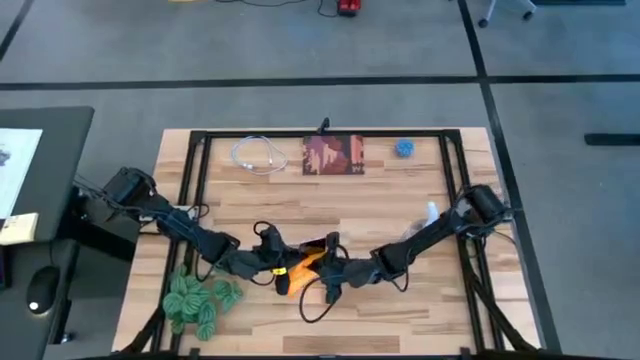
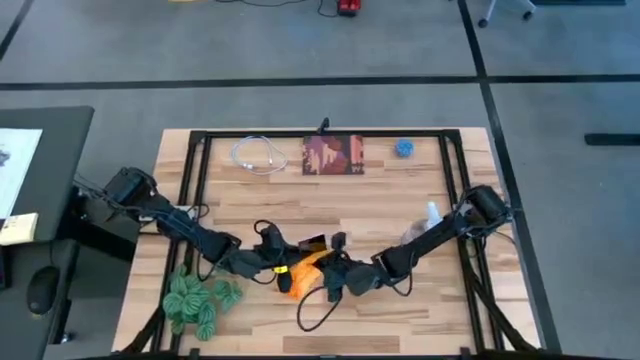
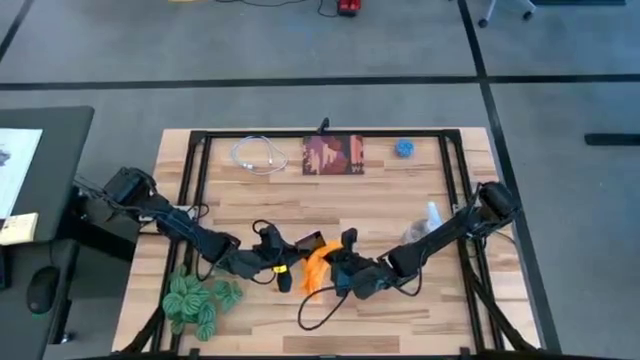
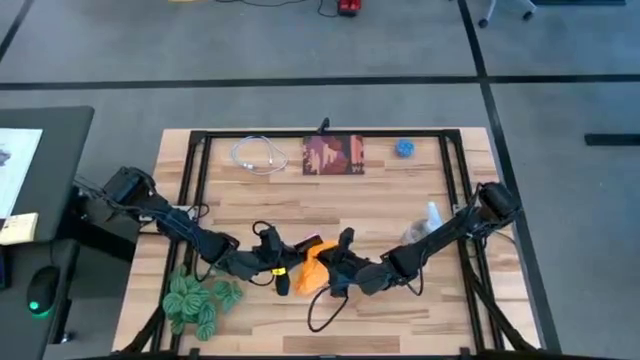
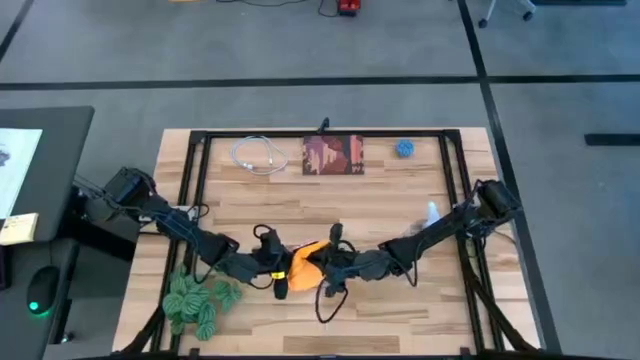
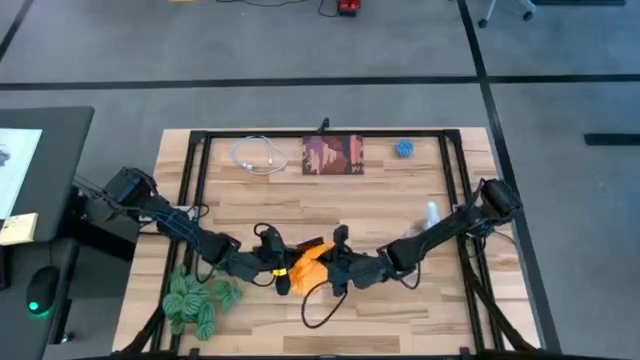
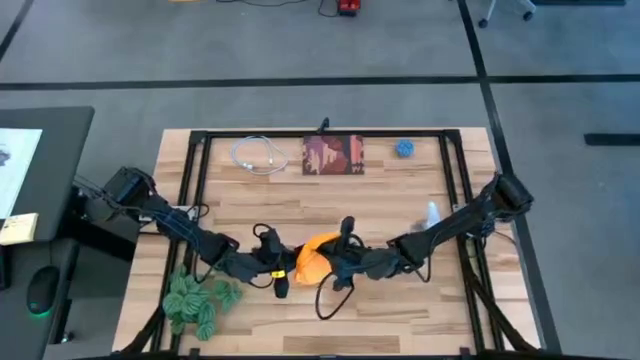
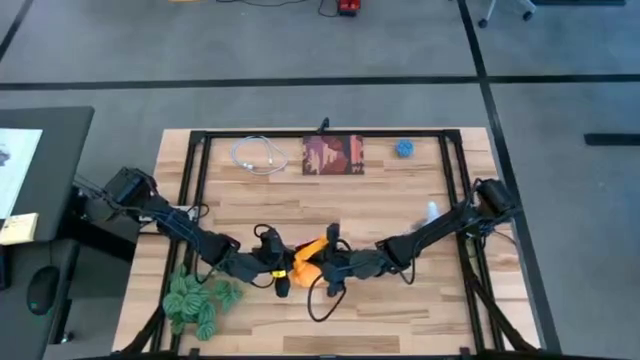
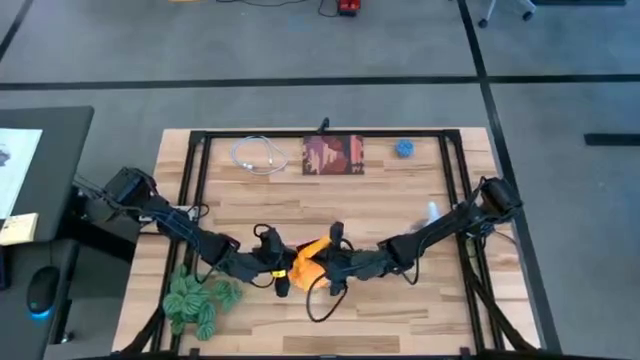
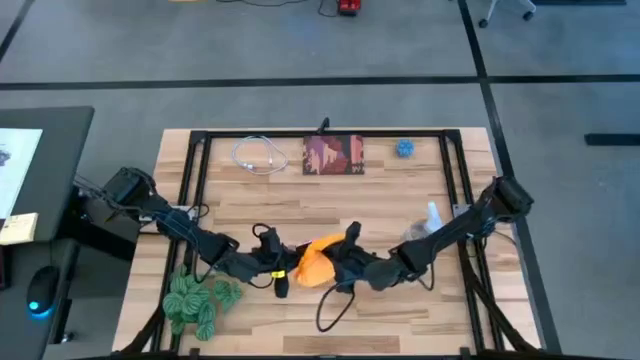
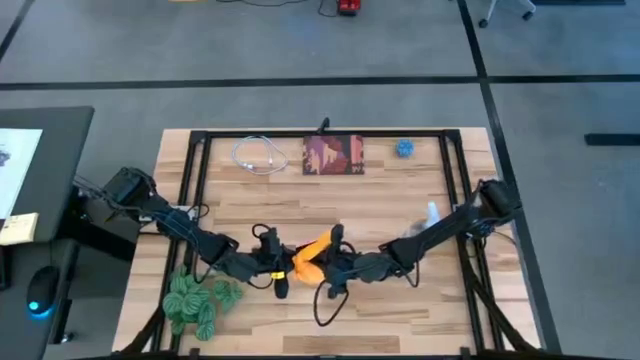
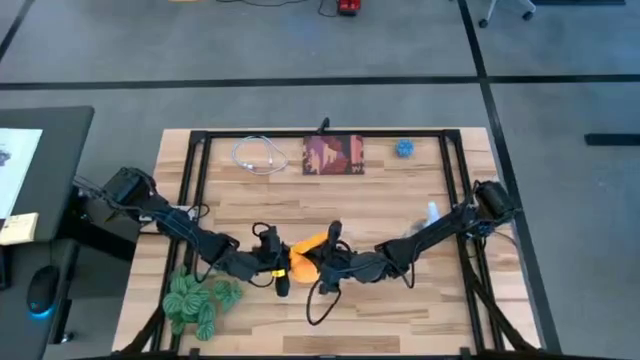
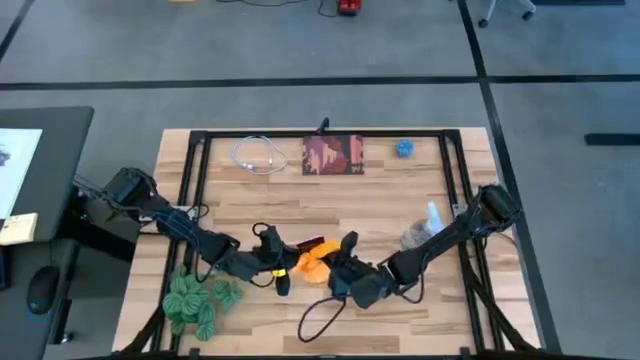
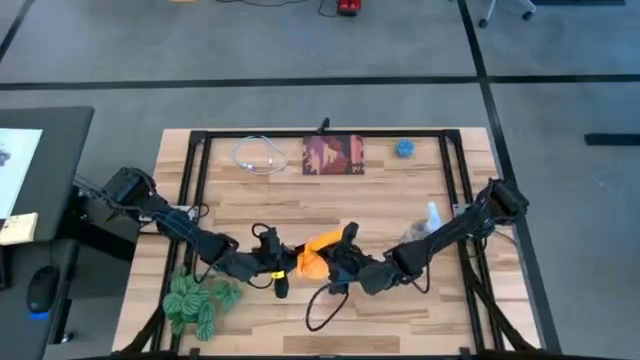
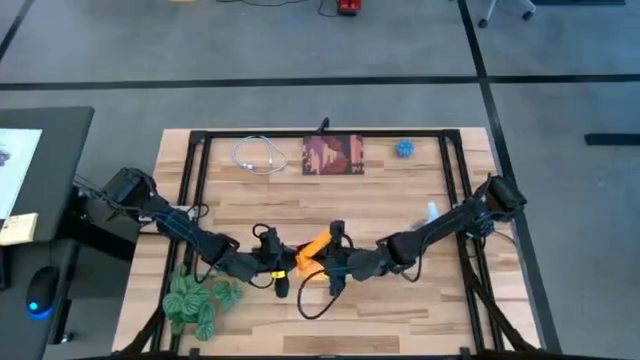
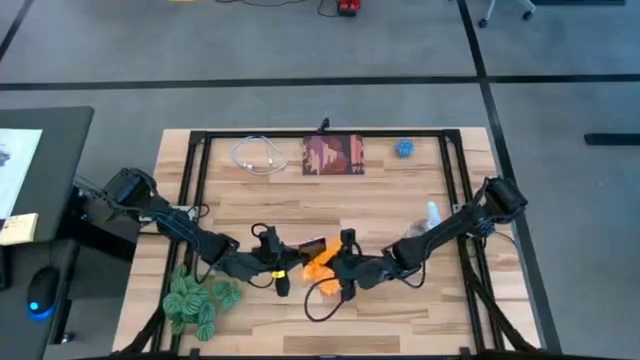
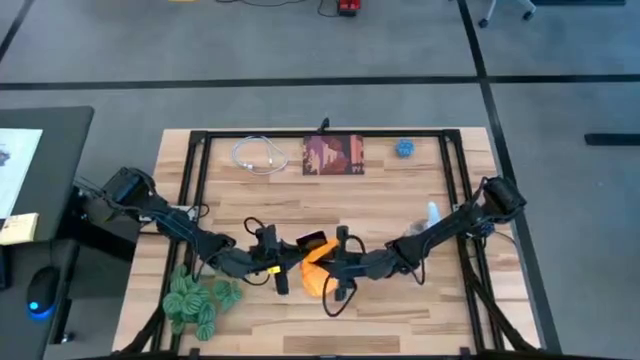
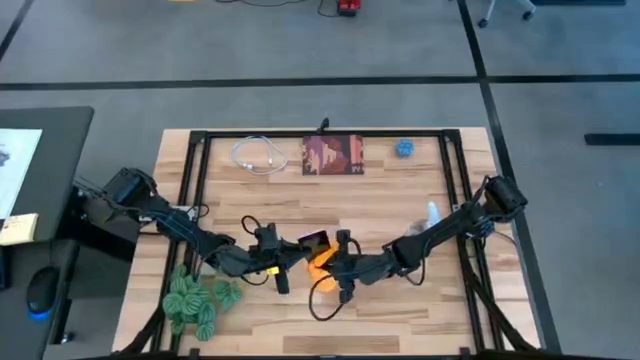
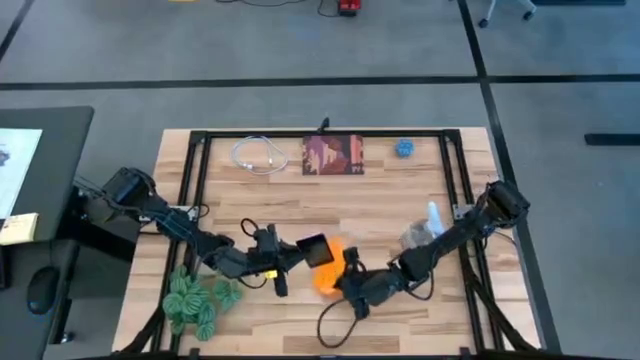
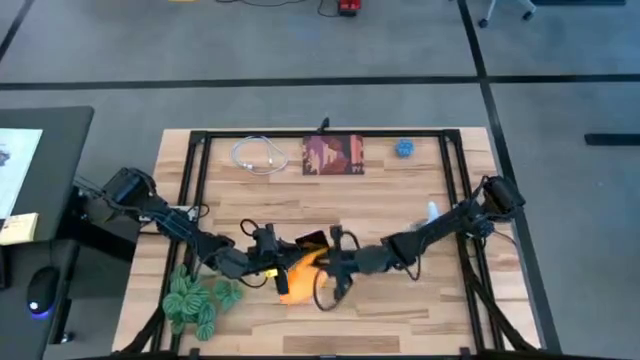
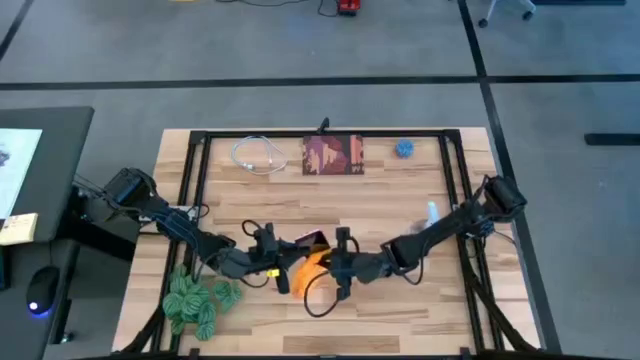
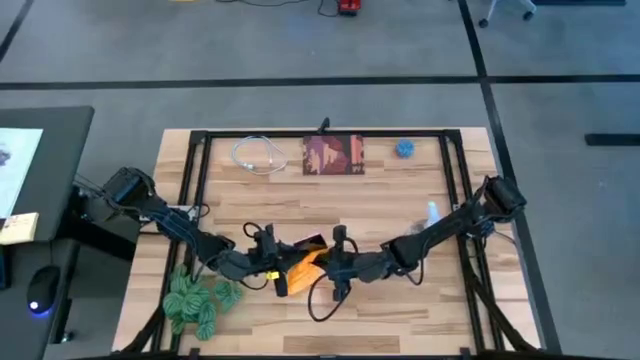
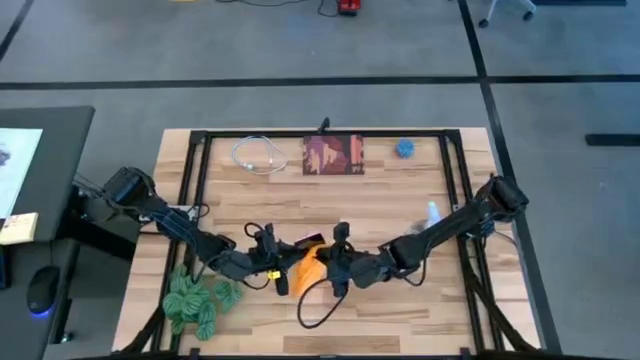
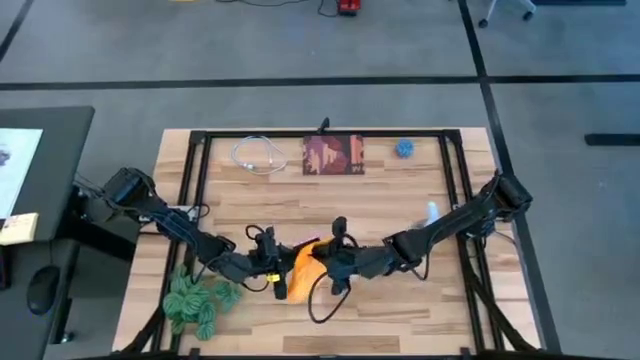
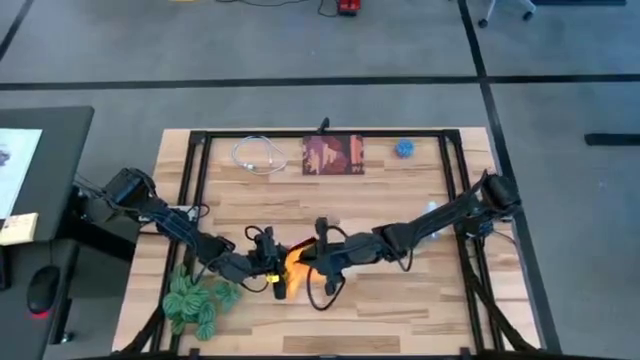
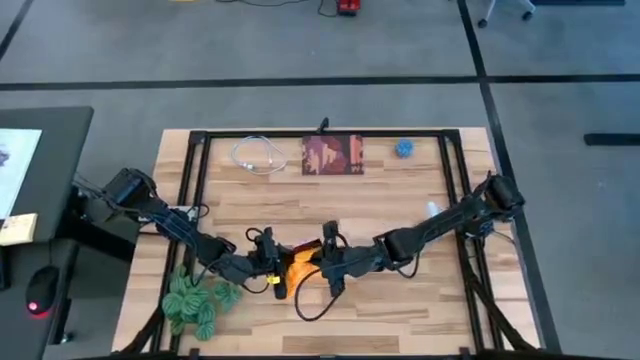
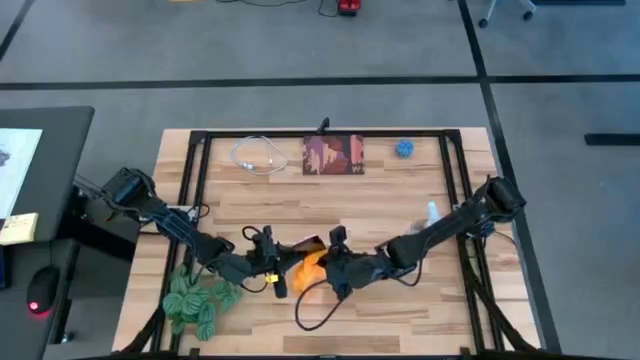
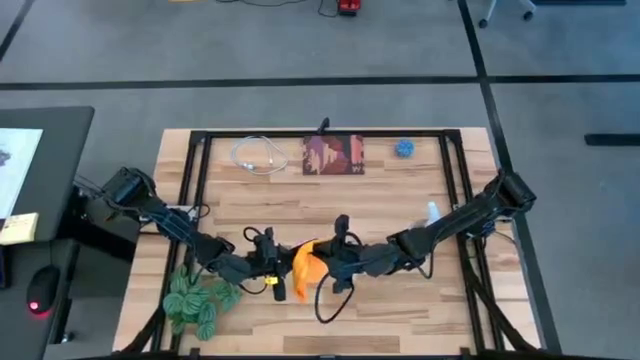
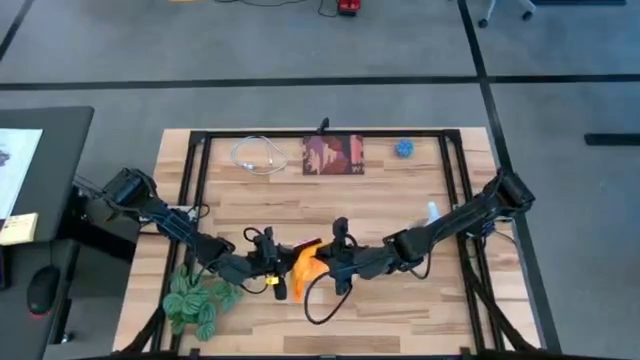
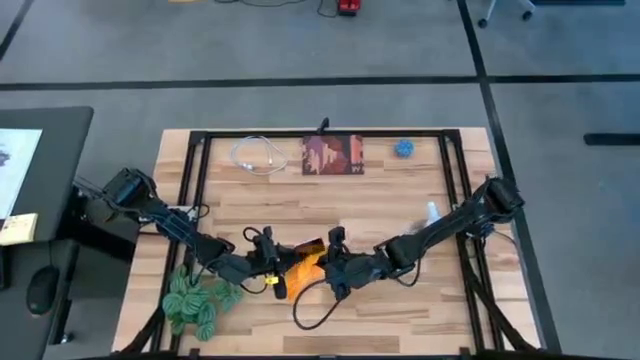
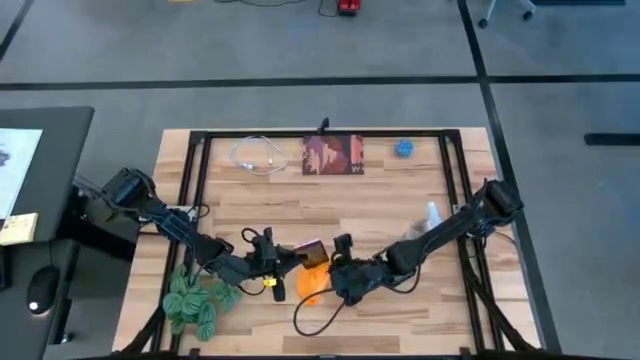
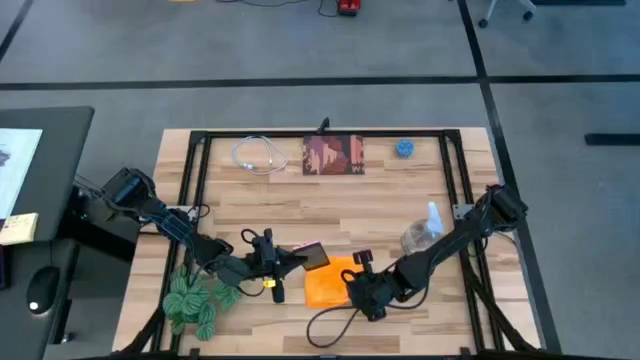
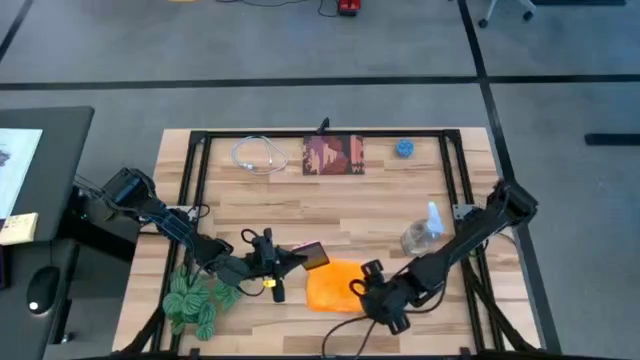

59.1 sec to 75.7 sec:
Task: Apply microfiber cloth
Wipe the front of the pink cellphone using microfiber cloth
